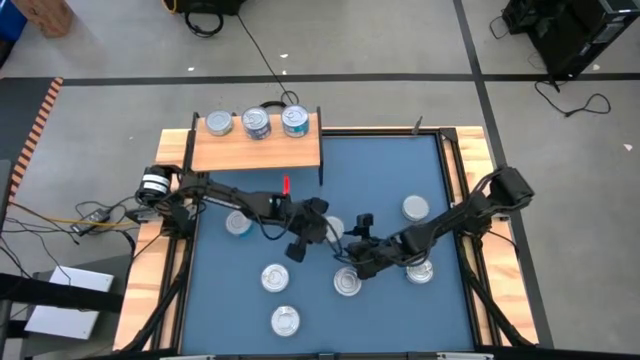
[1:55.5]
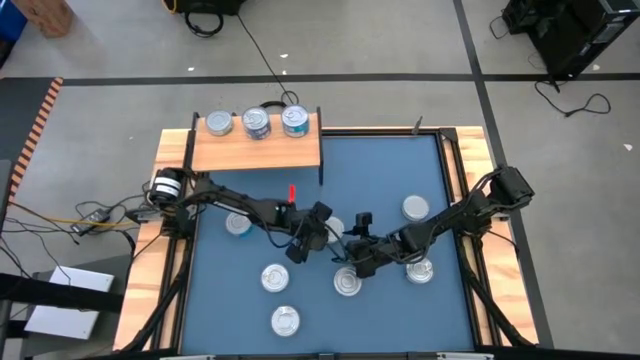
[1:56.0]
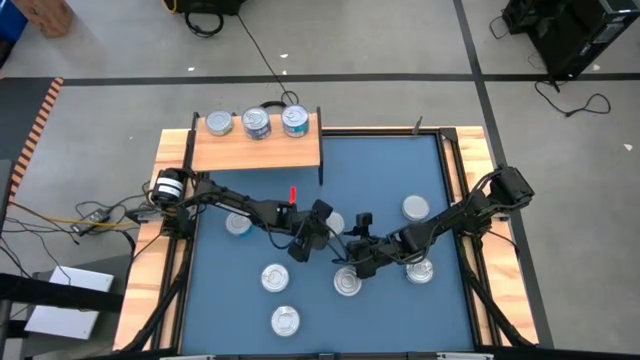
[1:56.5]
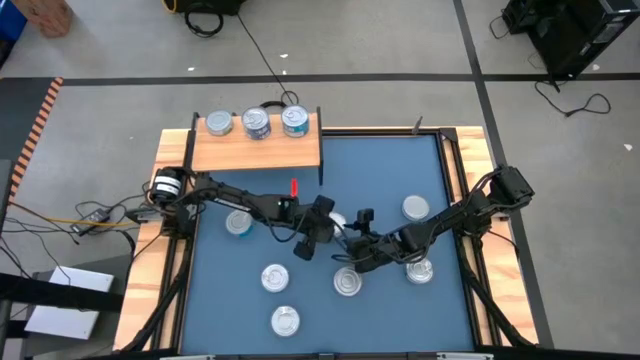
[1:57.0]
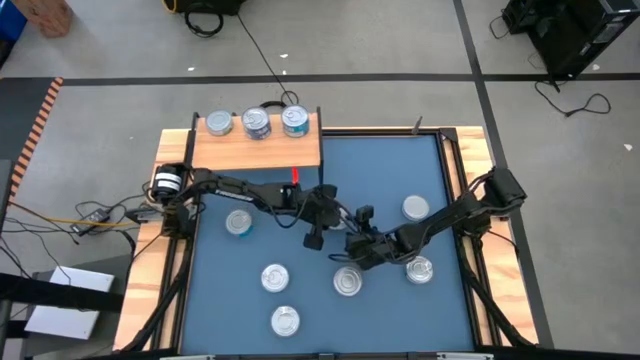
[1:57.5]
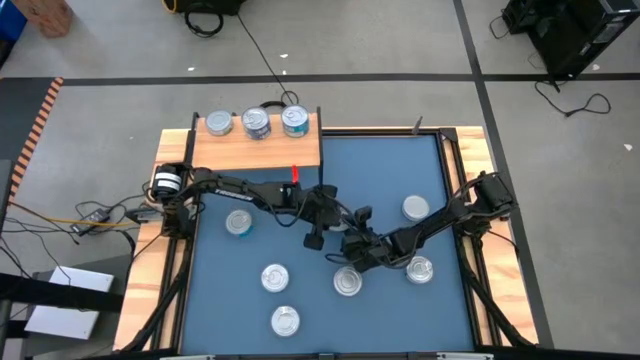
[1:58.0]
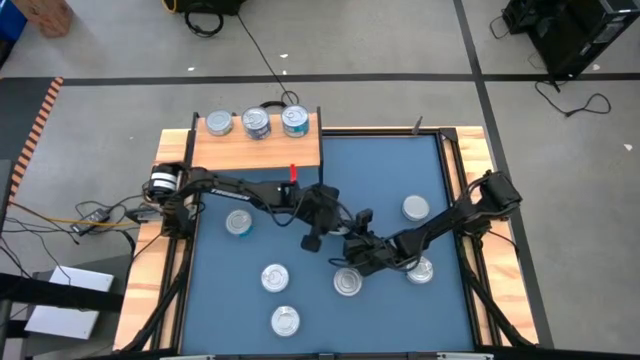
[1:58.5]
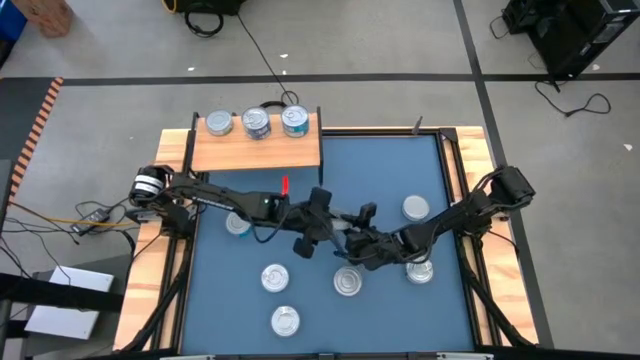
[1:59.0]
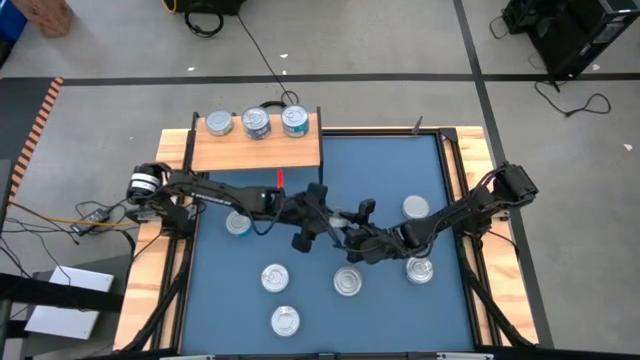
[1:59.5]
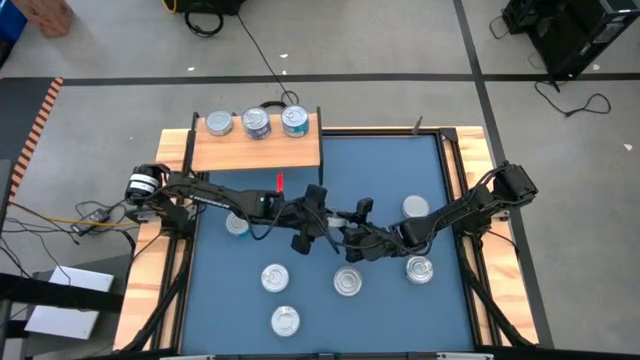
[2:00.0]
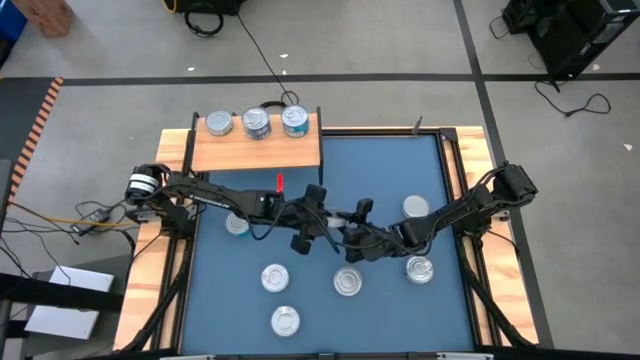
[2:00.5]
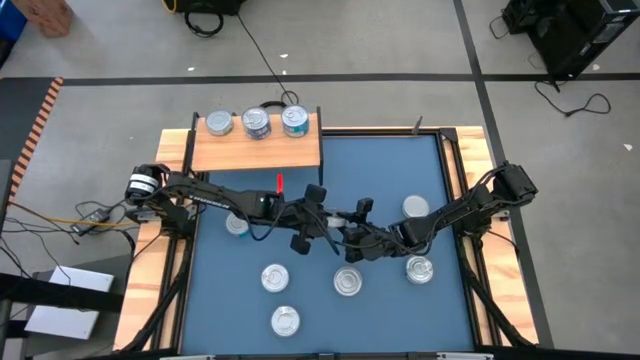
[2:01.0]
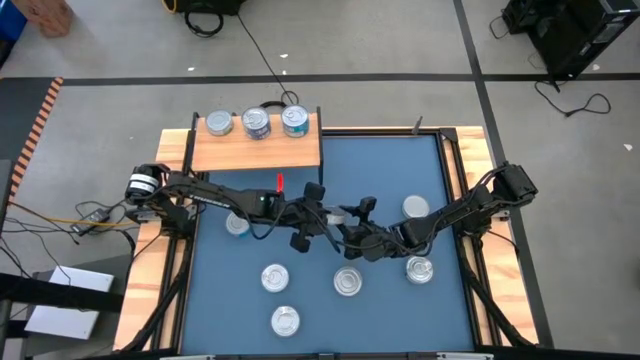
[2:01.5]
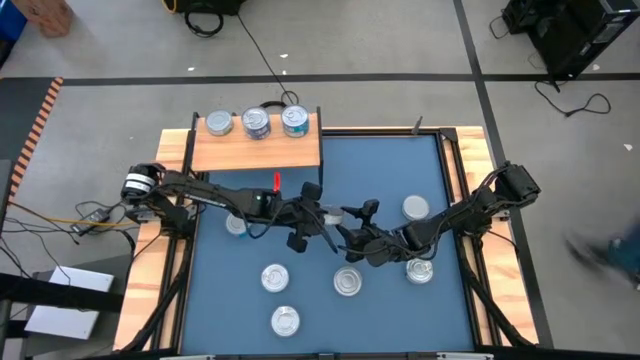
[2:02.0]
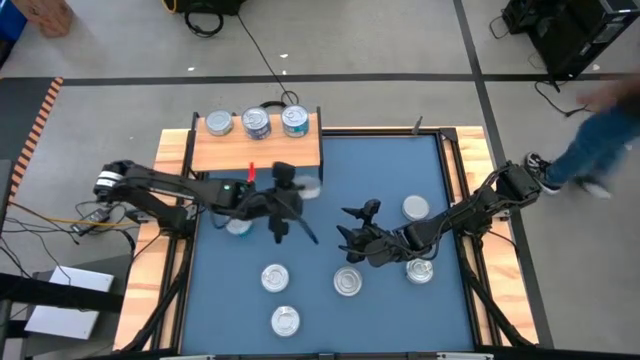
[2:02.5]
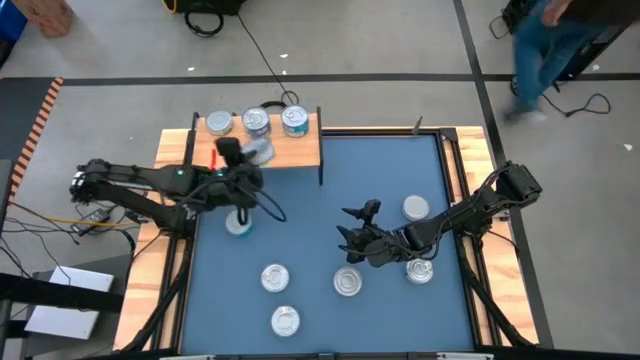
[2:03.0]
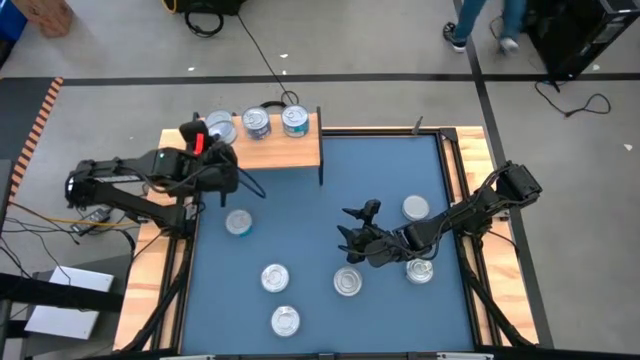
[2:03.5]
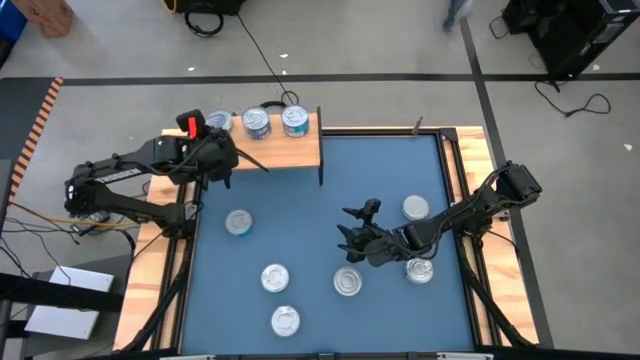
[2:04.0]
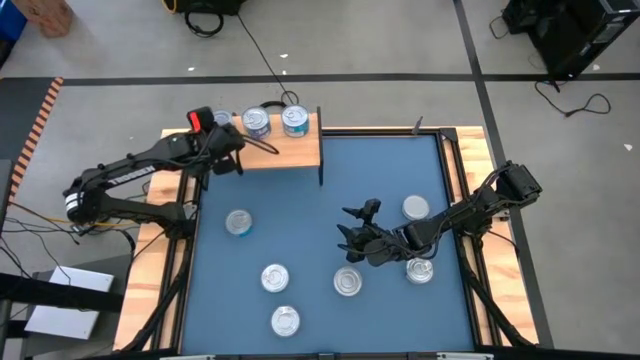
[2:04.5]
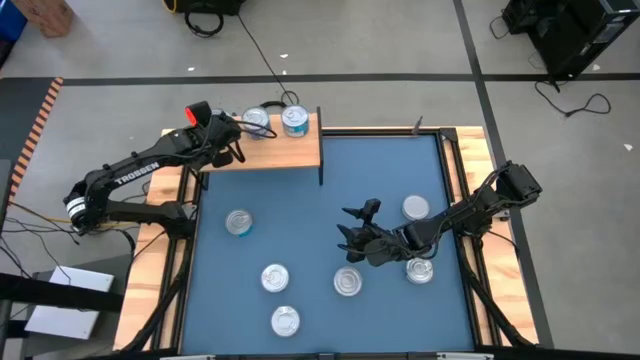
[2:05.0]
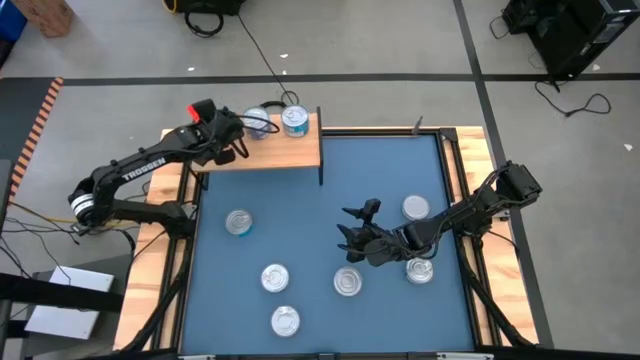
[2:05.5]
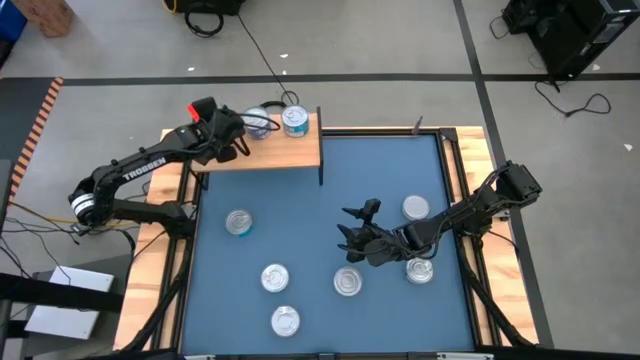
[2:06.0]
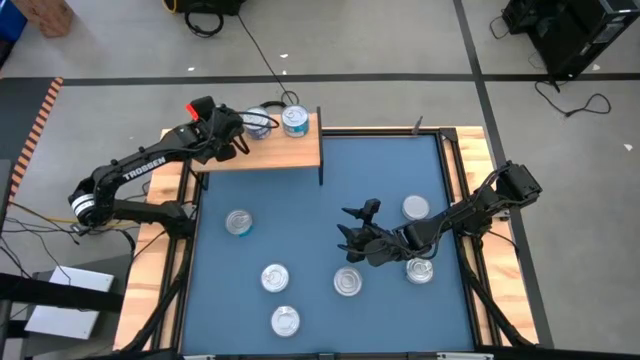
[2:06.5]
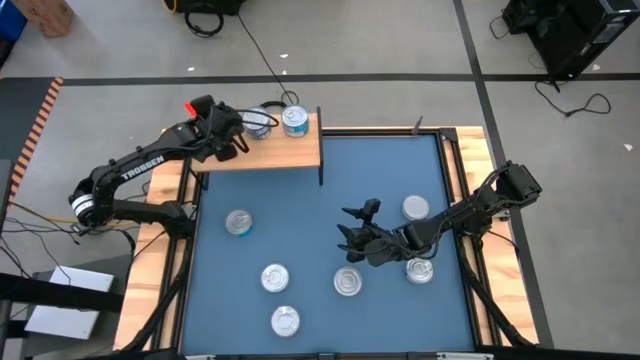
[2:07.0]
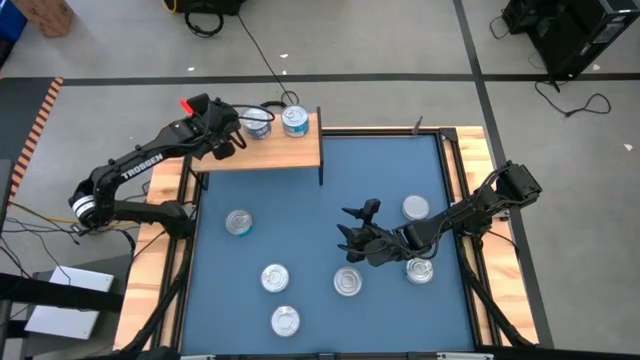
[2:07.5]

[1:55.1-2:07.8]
Task: Stack canned seafood by type on shelf
Stack the green white tuna can on top of the green white tuna can on the shelf

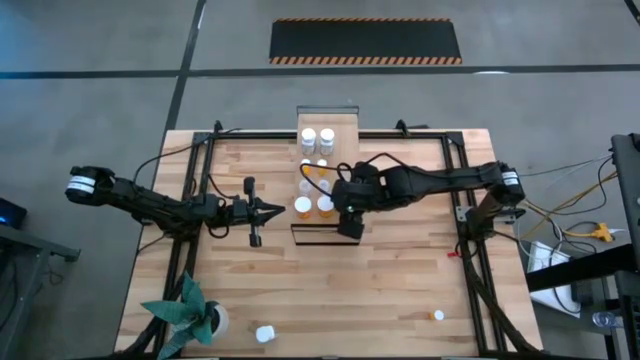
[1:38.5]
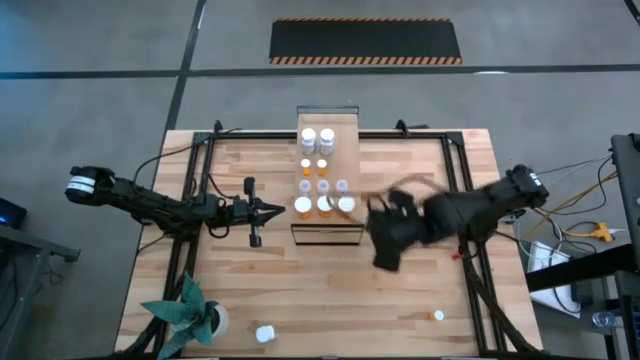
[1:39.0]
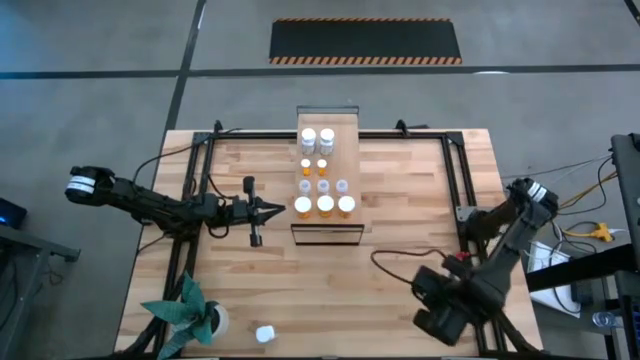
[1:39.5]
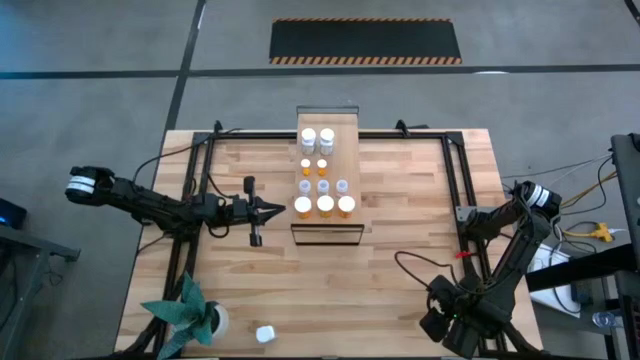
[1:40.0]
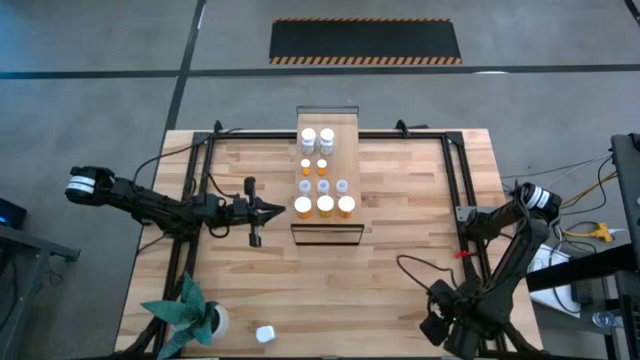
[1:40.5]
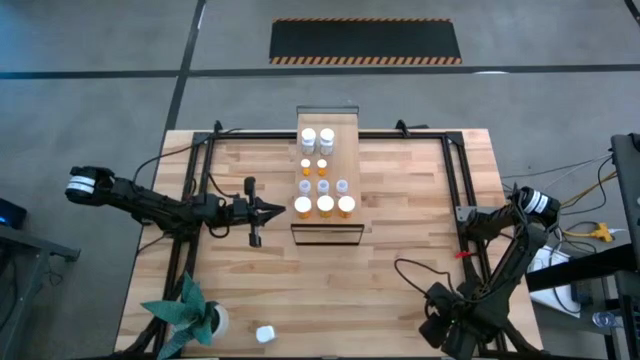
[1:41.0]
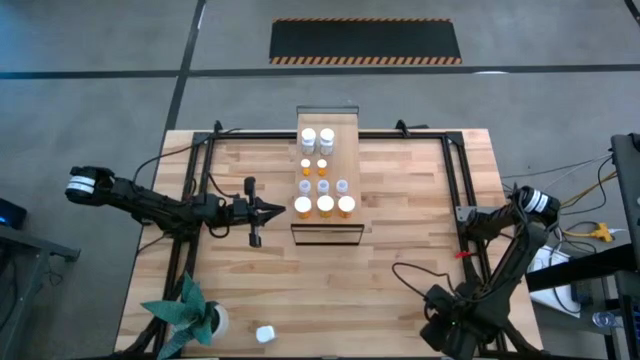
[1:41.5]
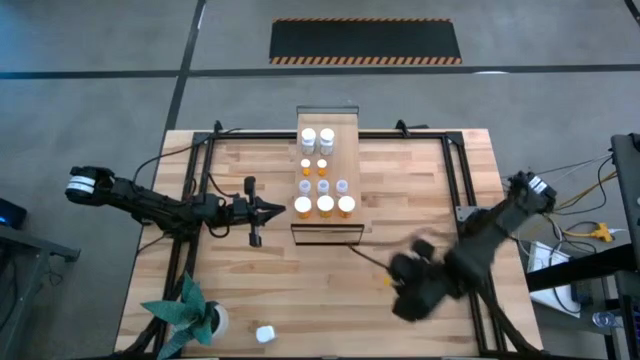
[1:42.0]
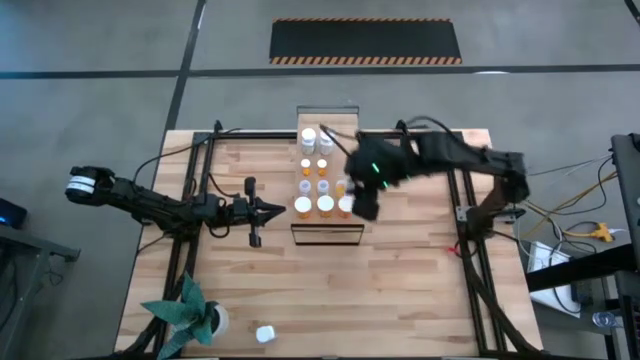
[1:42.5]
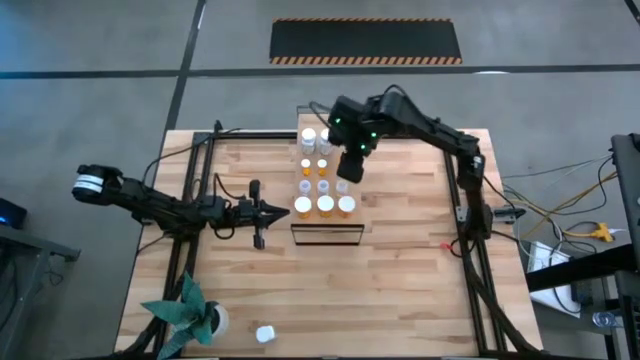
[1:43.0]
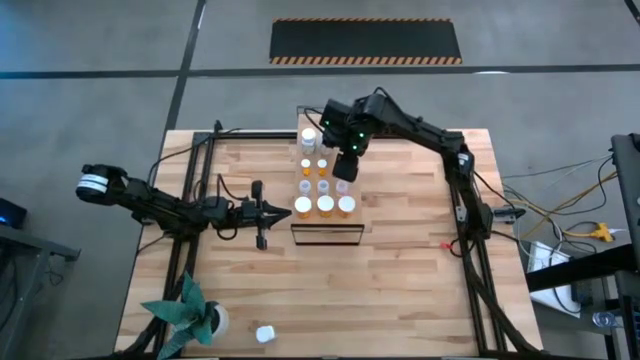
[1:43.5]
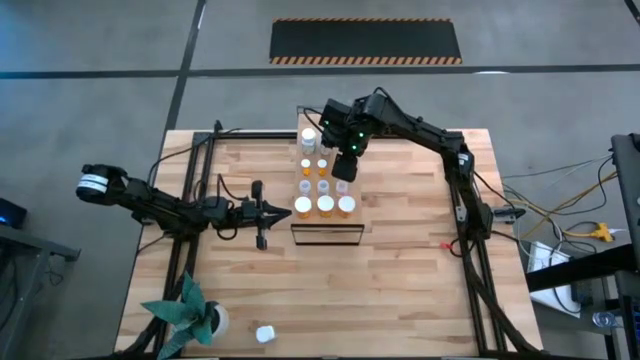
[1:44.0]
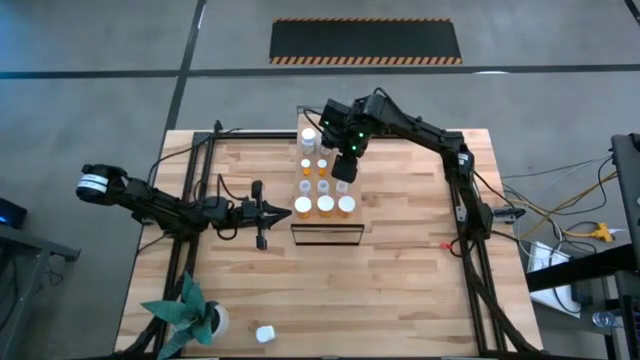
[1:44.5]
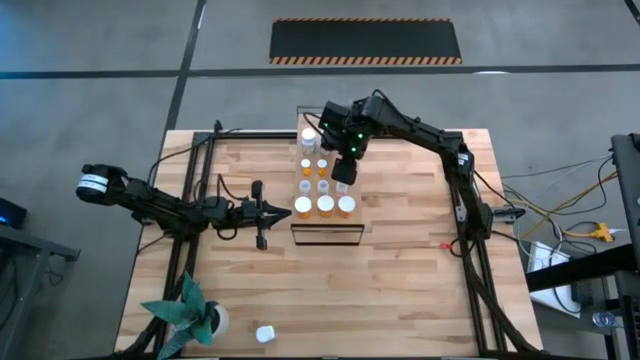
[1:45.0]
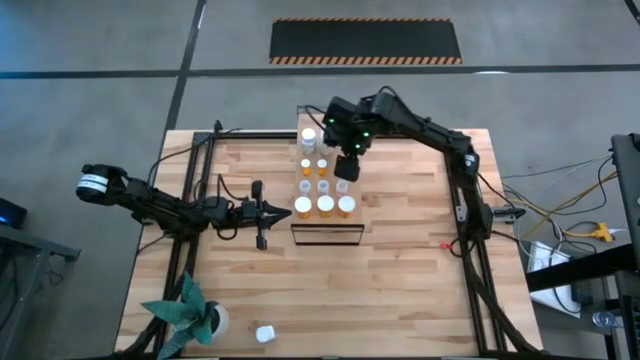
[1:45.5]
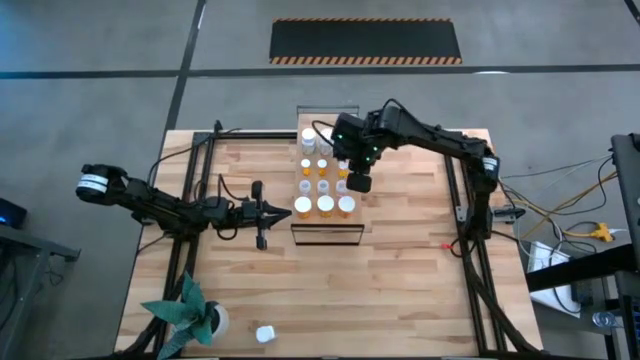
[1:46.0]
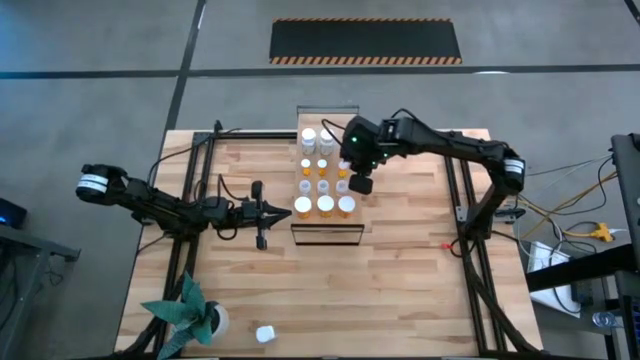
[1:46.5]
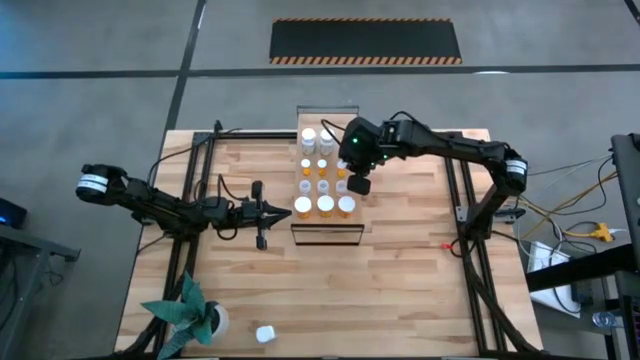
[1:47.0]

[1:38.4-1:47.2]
Task: Pick and place medicine bottles onto shelf by color
Put the small orange pill bottle aligned with the other small orange bottles on the shelf
